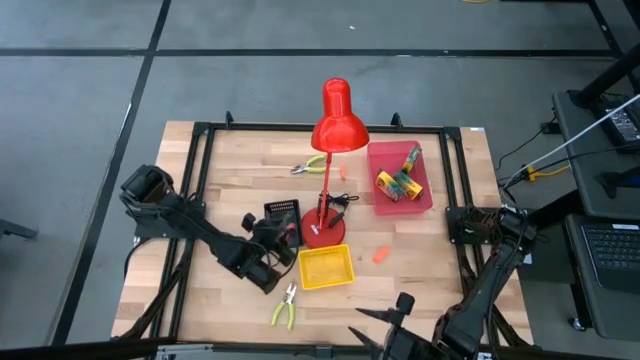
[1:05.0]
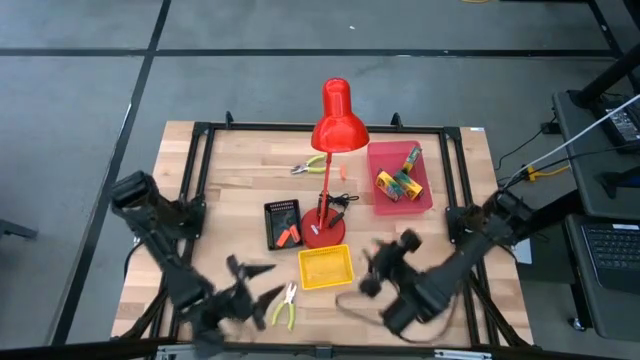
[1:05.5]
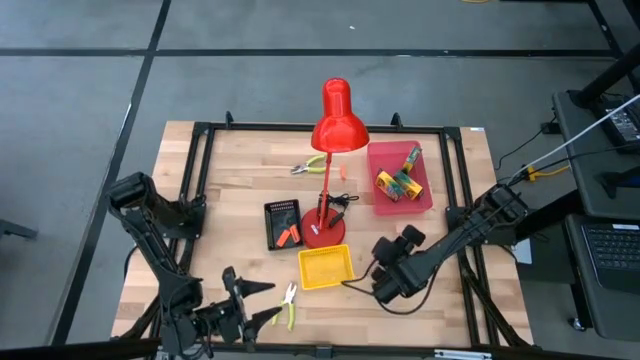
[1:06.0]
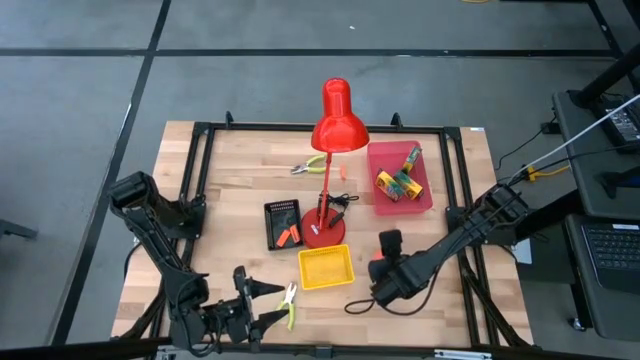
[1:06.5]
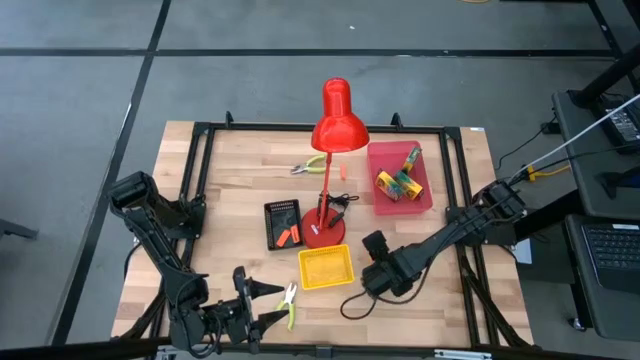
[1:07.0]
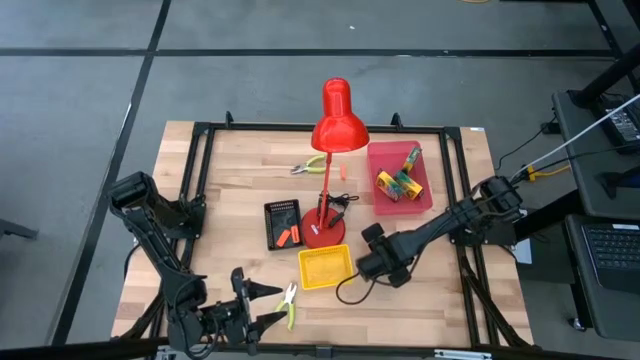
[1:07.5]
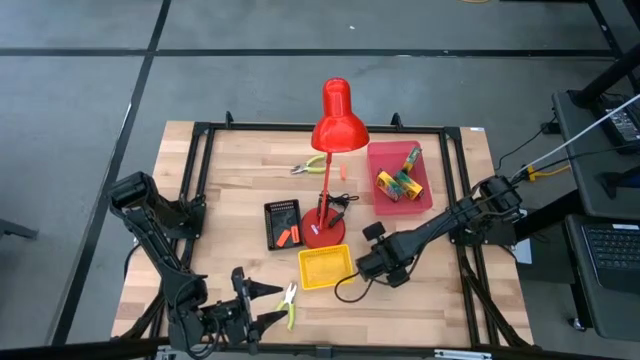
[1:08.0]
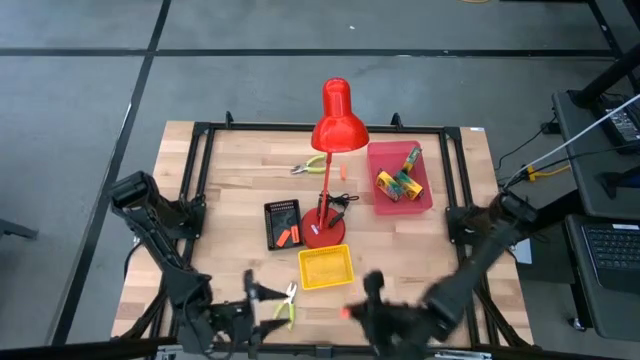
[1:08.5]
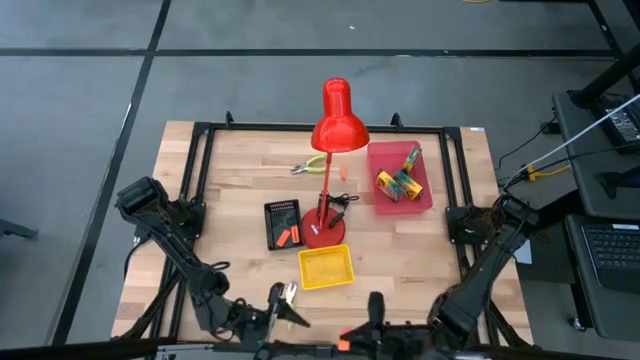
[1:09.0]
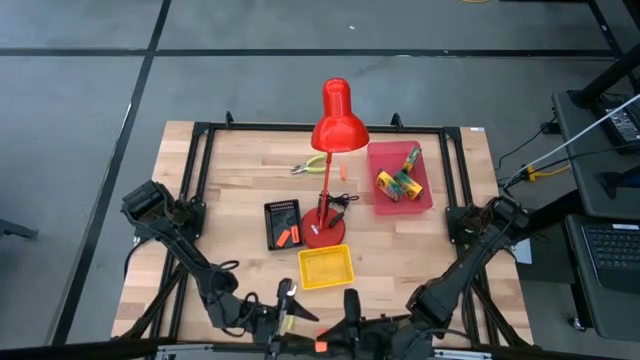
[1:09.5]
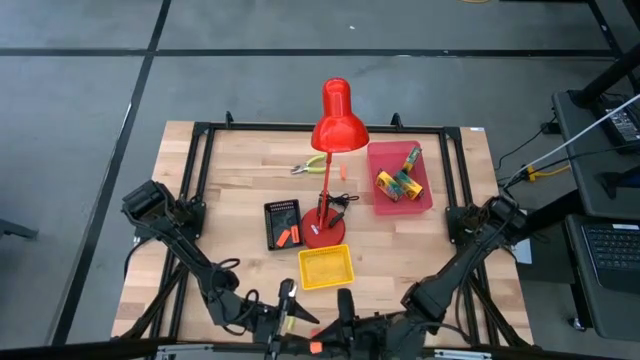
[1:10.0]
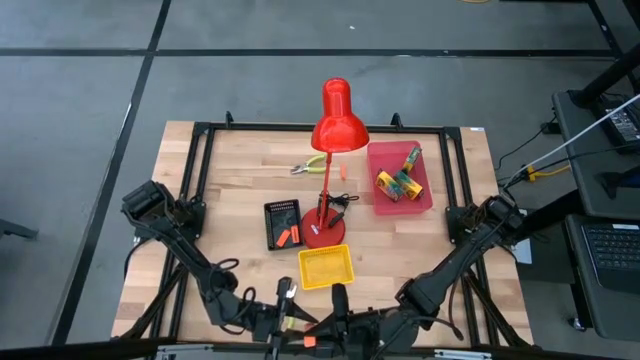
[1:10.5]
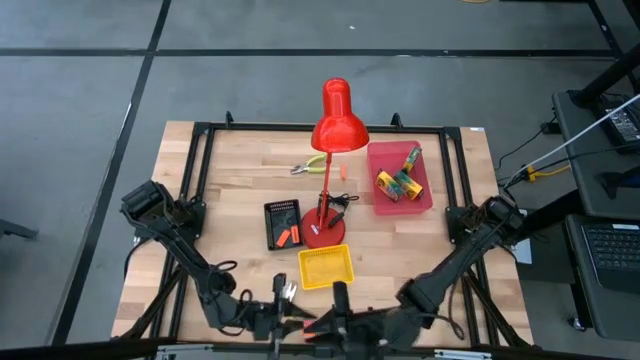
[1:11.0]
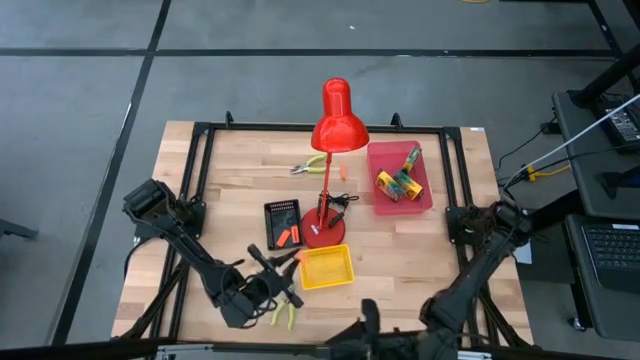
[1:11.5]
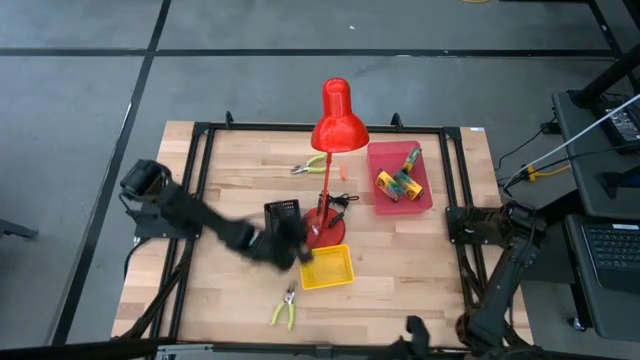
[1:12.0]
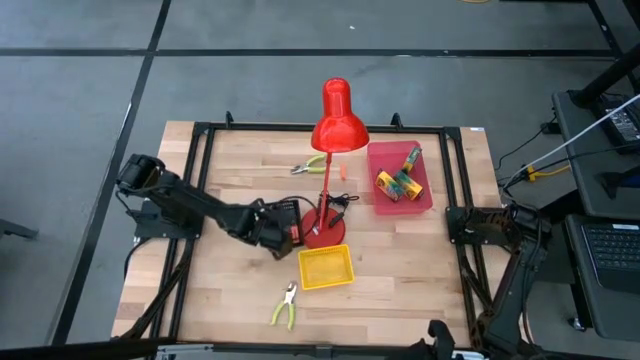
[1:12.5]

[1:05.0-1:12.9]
Task: Pick & Place School Supplies
Put the orange eraser into the black bin

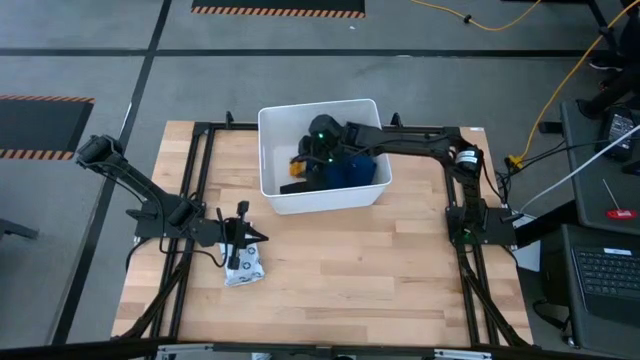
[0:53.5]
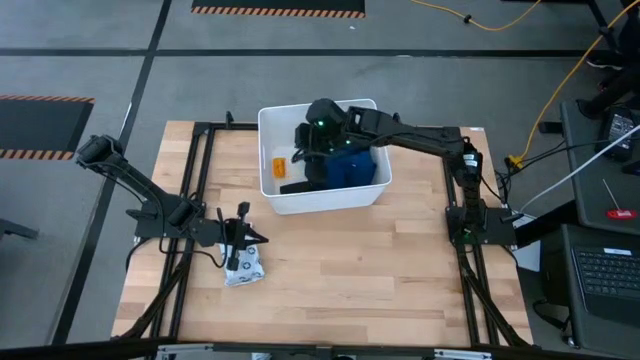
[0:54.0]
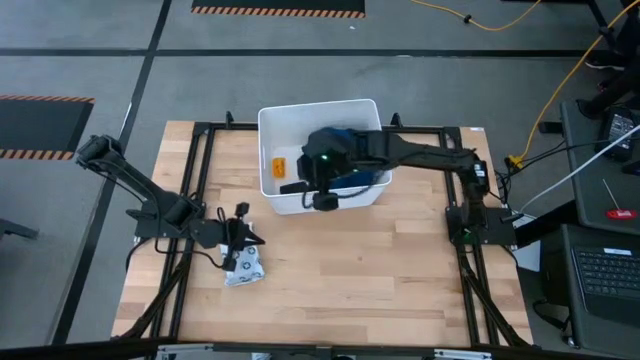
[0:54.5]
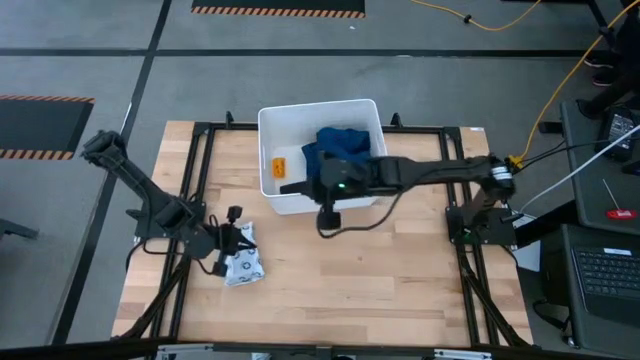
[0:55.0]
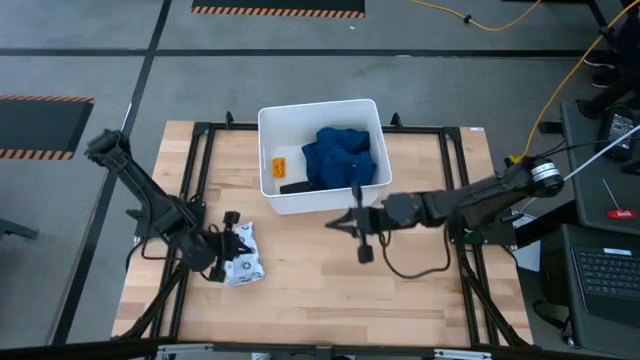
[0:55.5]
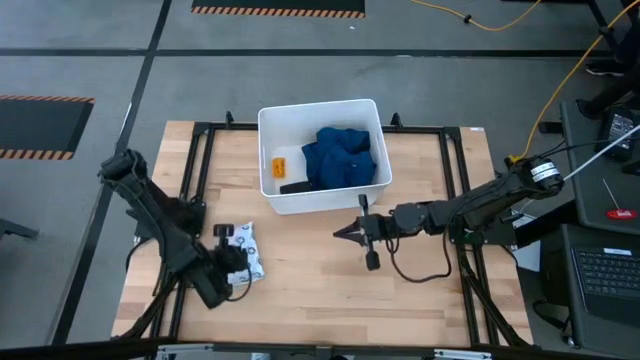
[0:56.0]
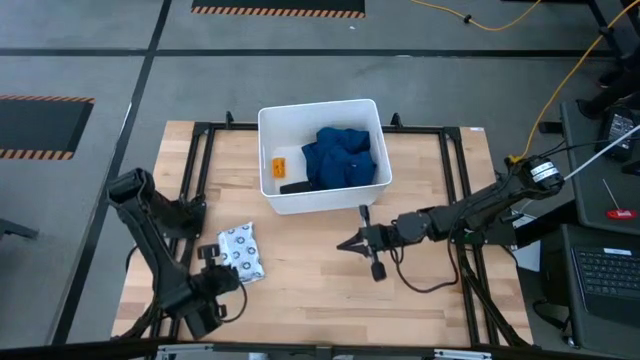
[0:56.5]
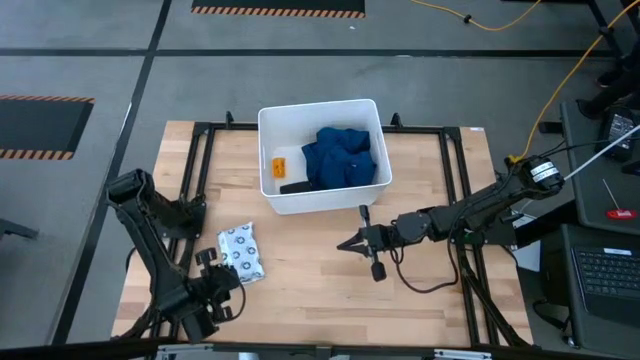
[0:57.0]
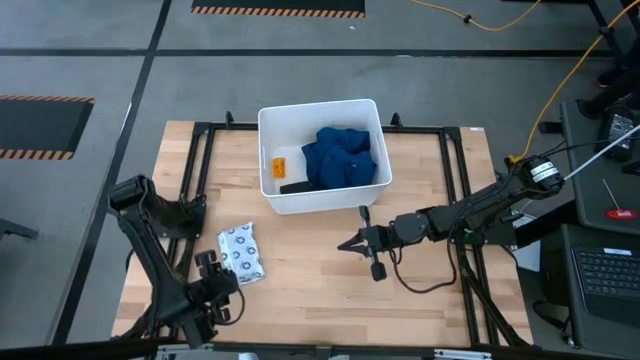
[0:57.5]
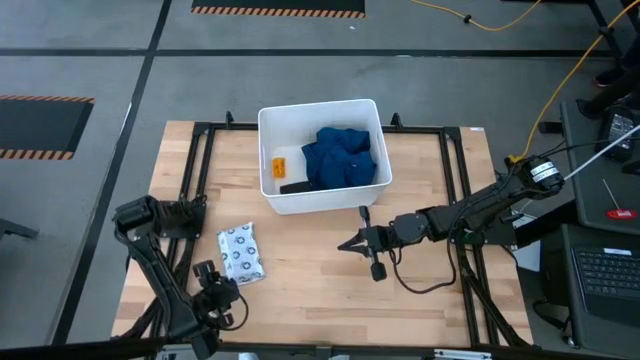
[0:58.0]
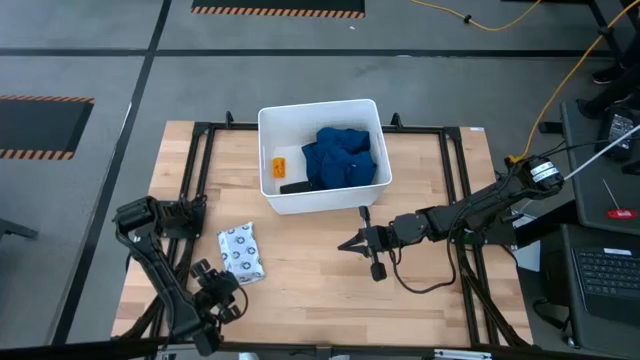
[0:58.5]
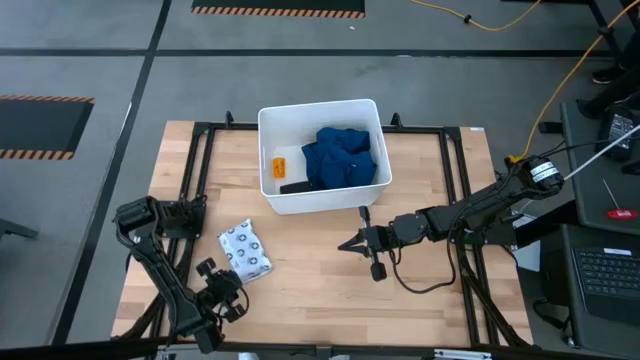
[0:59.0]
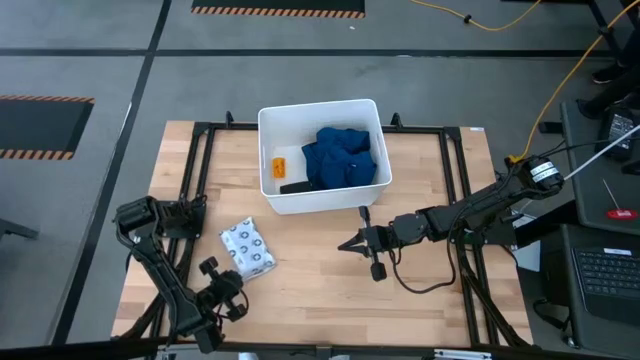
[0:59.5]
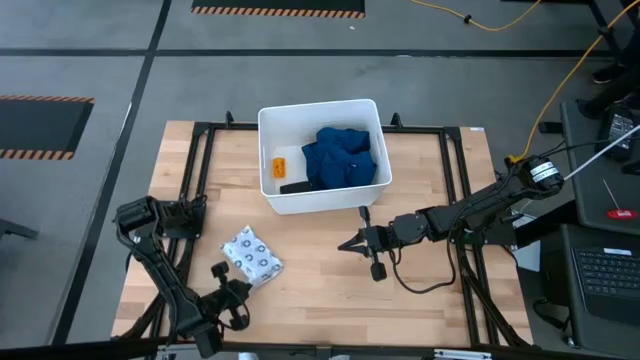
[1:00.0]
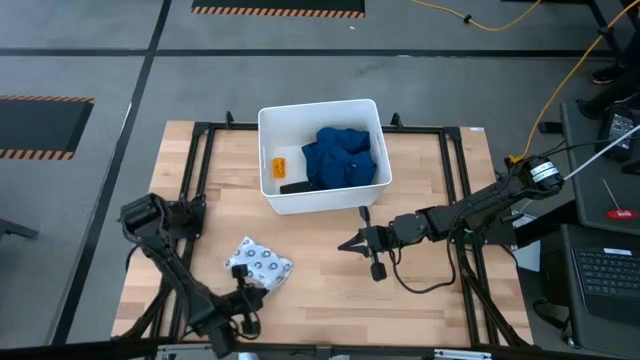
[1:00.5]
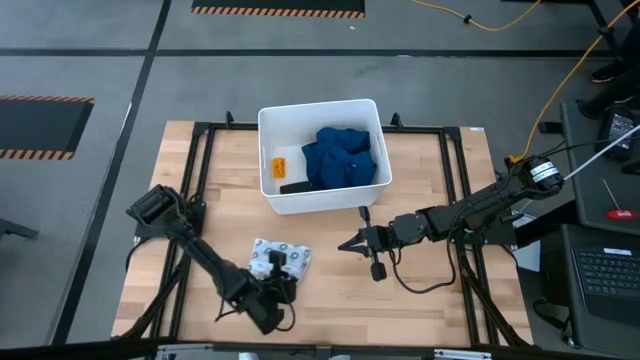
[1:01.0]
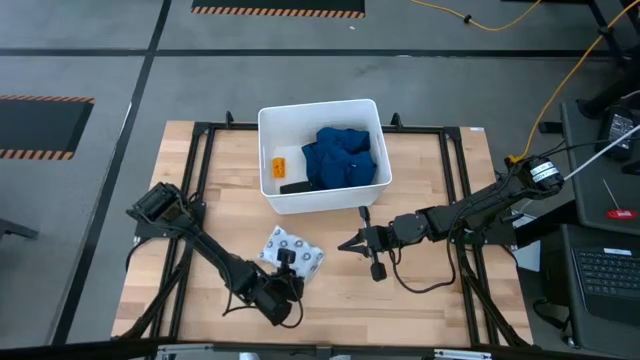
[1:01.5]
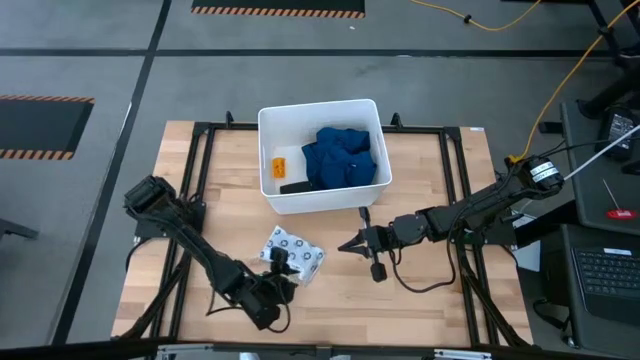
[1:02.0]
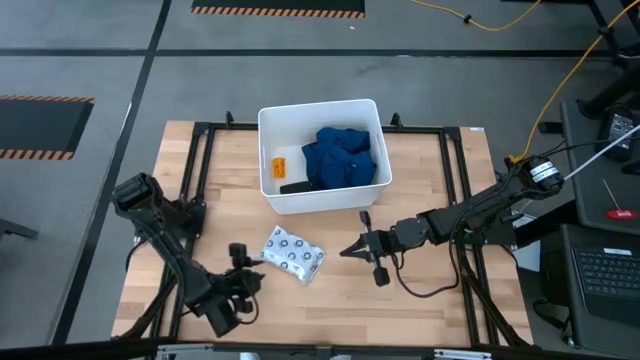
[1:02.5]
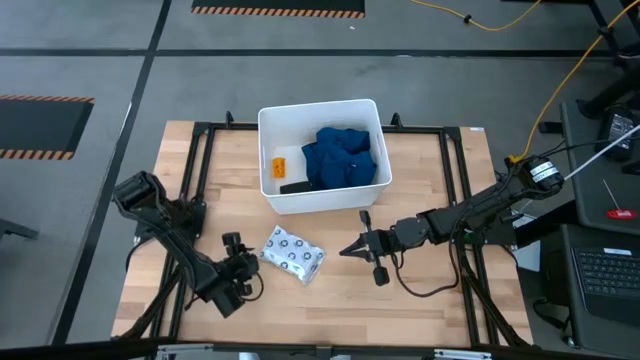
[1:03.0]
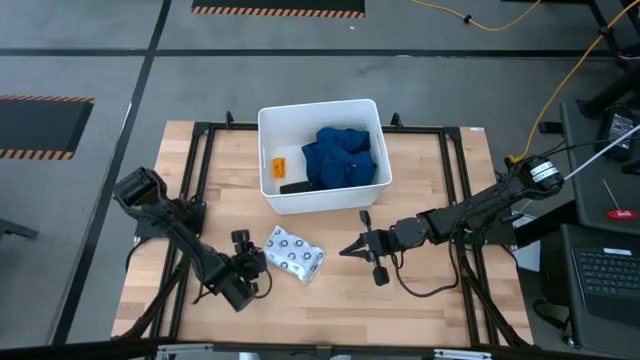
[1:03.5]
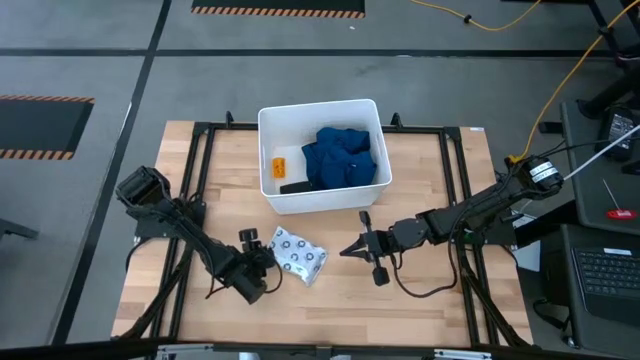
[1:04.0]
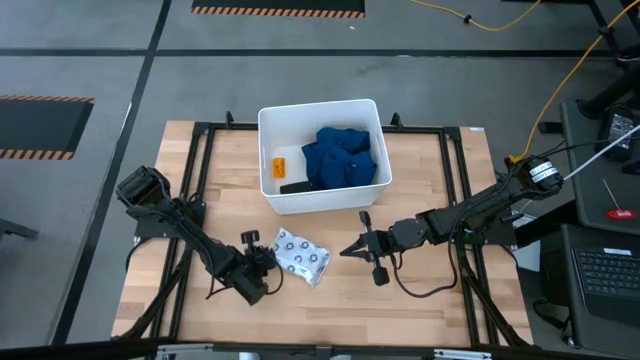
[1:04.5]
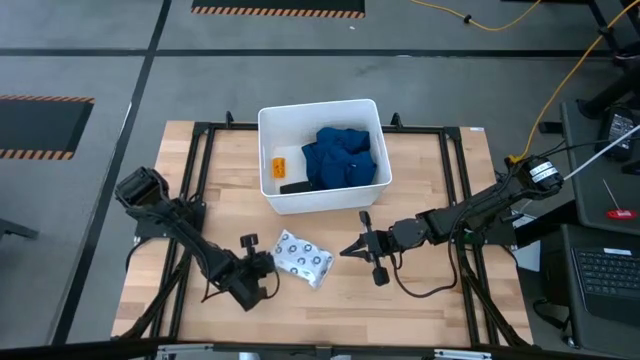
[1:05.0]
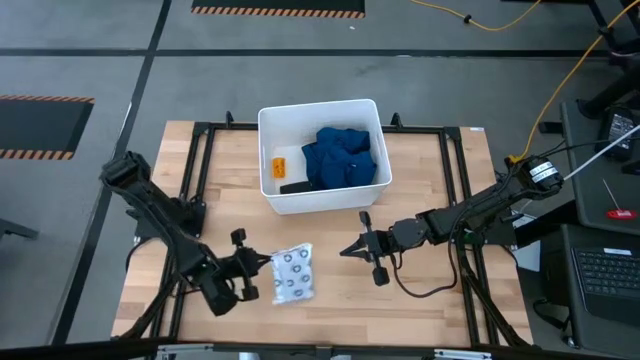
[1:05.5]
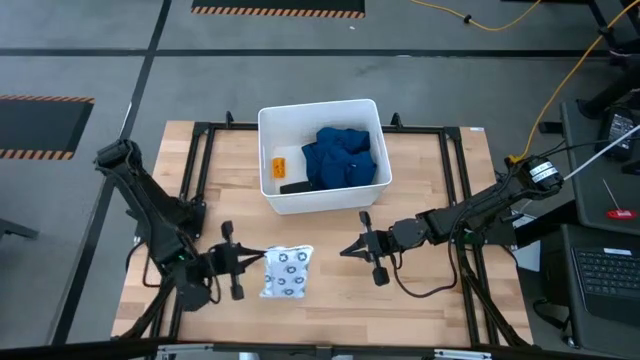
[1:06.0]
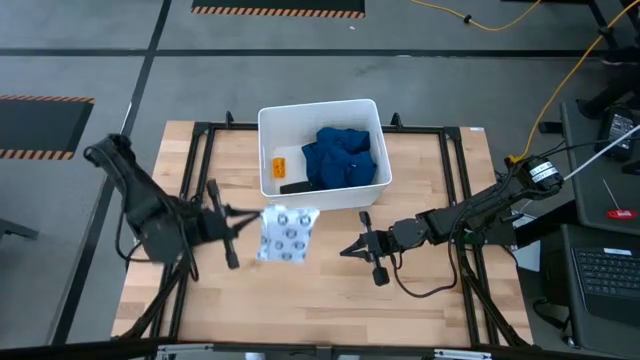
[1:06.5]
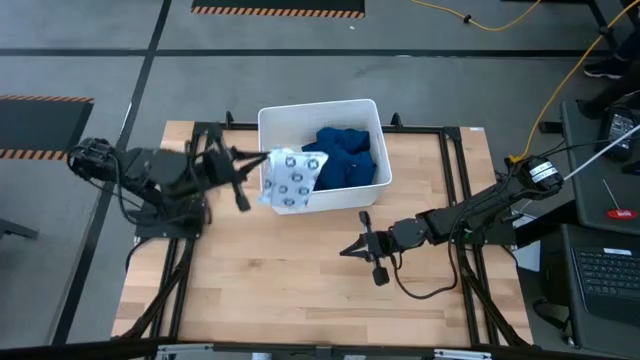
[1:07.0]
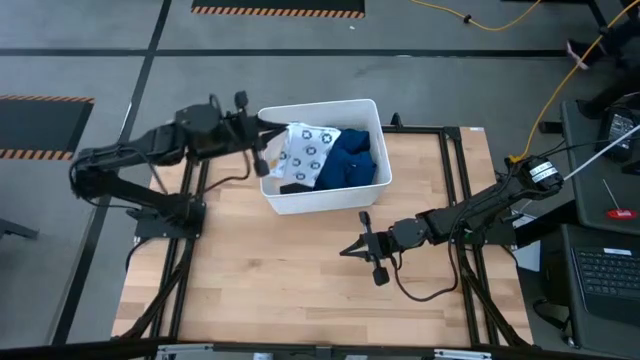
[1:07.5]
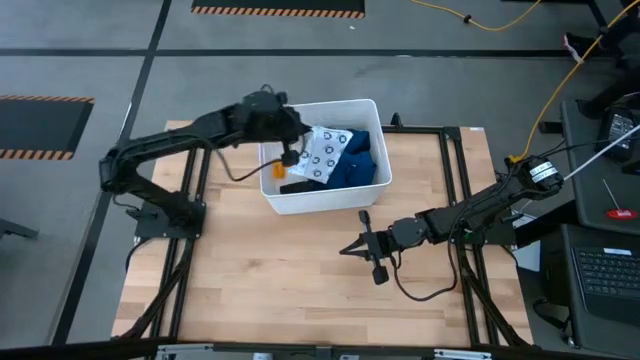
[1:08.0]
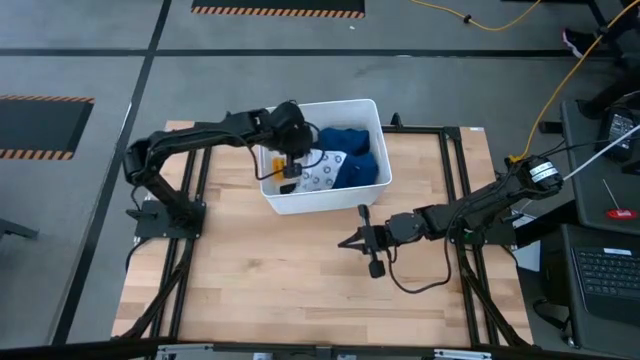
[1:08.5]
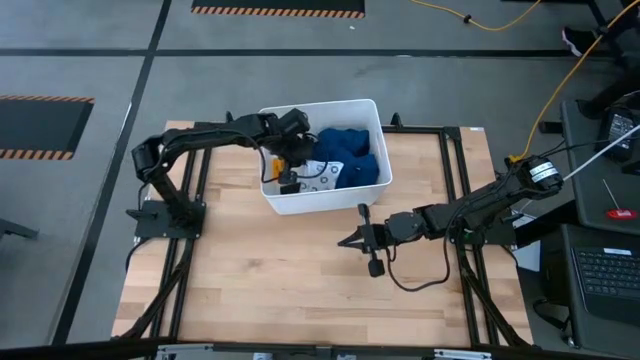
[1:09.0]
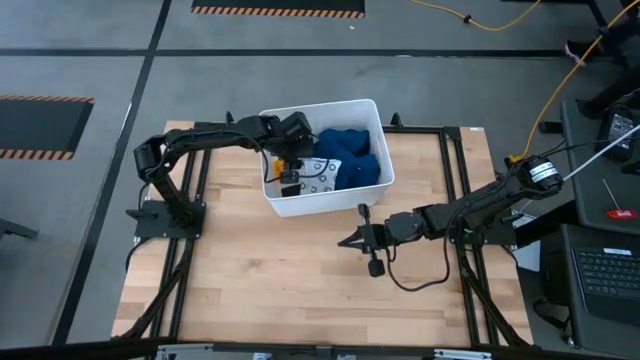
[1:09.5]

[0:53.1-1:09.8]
Task: Pick & place medical supplies in basket/bin
Put the white mailer bag into the white bin
